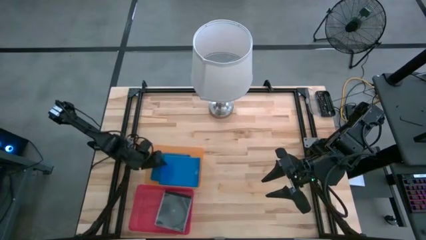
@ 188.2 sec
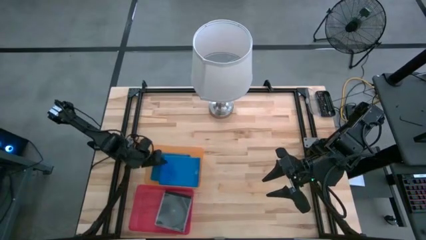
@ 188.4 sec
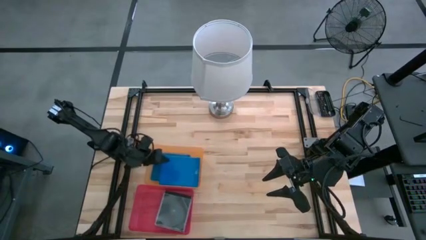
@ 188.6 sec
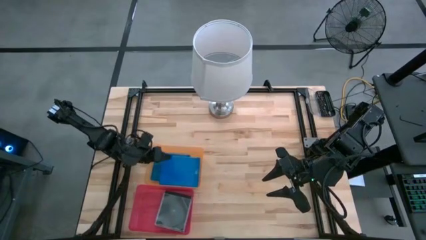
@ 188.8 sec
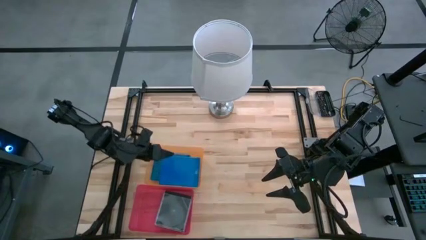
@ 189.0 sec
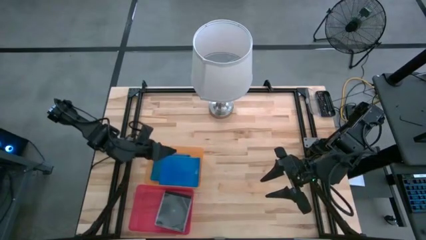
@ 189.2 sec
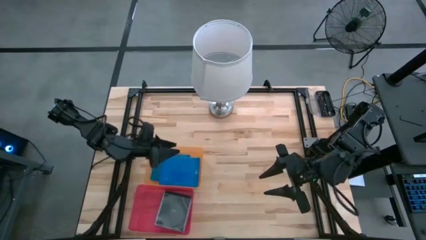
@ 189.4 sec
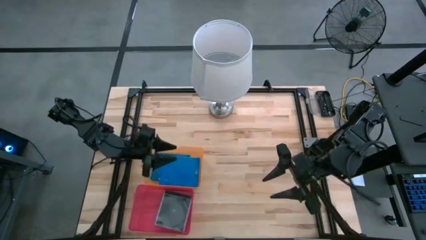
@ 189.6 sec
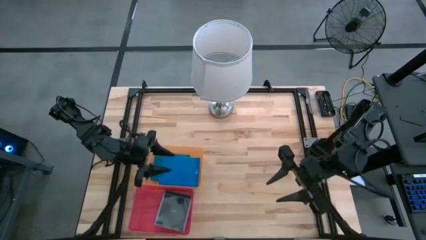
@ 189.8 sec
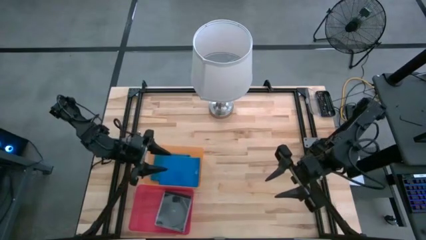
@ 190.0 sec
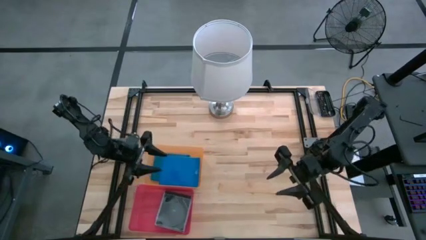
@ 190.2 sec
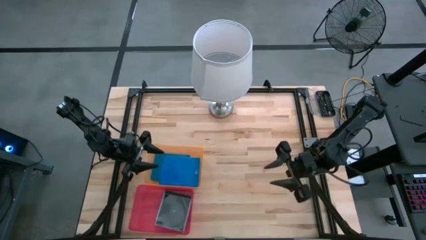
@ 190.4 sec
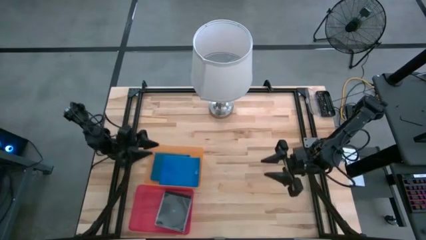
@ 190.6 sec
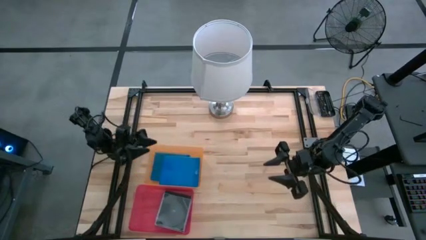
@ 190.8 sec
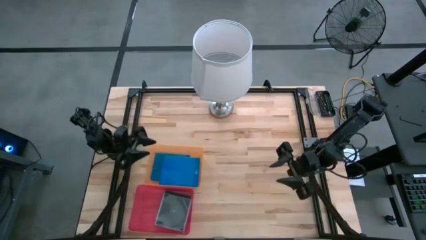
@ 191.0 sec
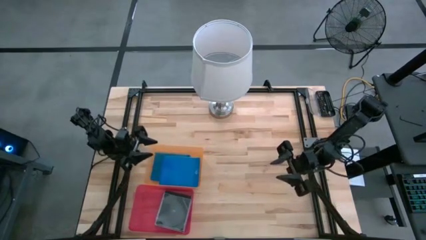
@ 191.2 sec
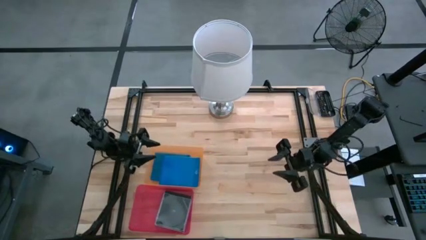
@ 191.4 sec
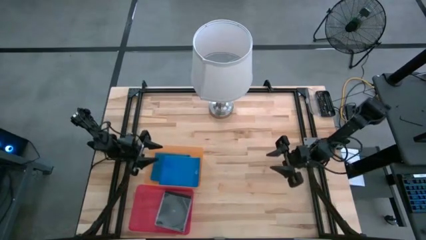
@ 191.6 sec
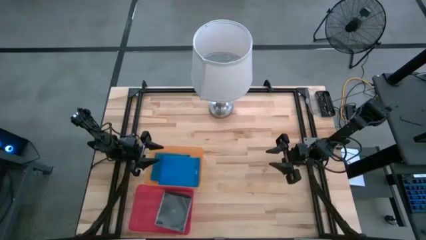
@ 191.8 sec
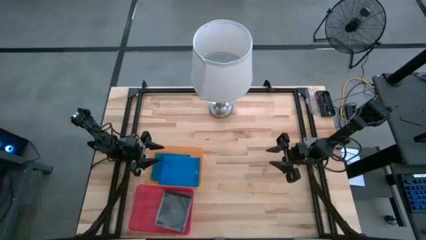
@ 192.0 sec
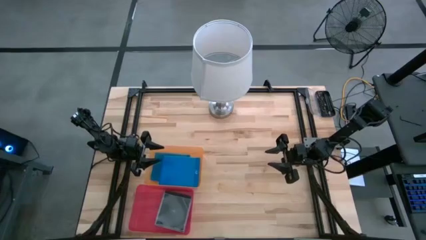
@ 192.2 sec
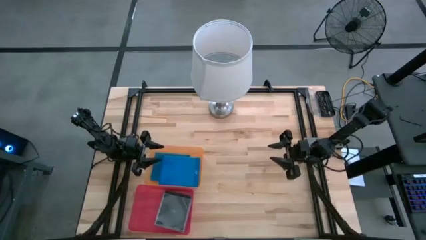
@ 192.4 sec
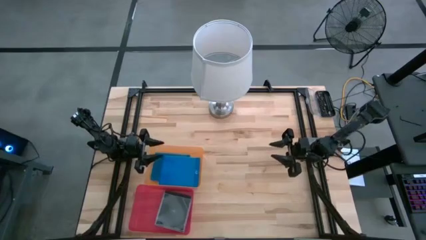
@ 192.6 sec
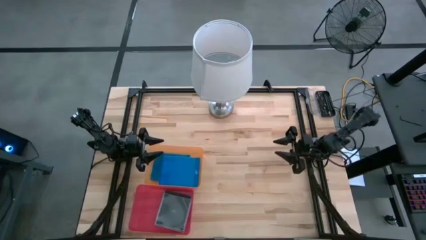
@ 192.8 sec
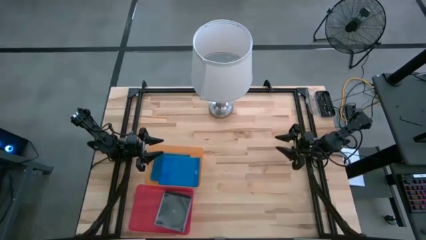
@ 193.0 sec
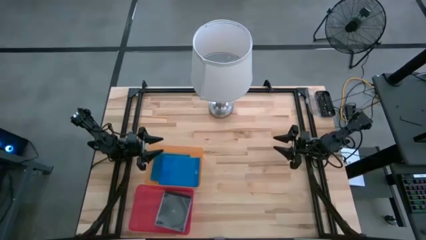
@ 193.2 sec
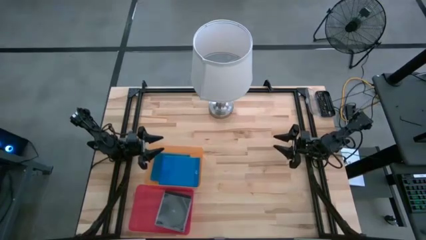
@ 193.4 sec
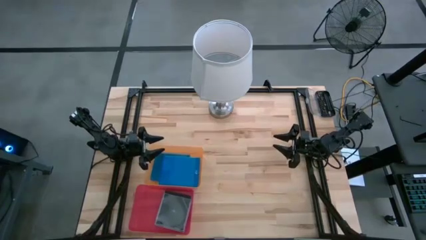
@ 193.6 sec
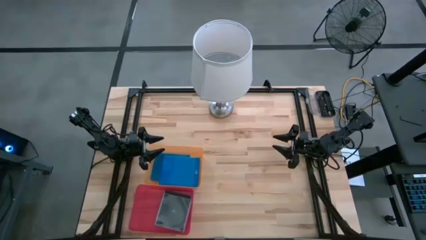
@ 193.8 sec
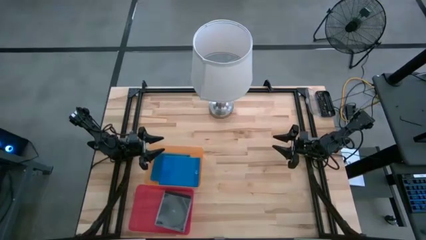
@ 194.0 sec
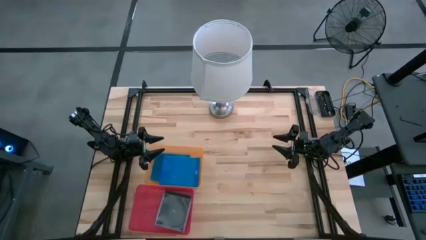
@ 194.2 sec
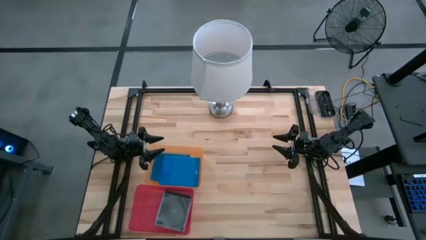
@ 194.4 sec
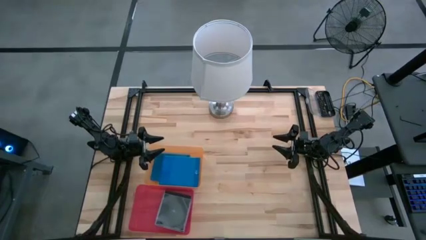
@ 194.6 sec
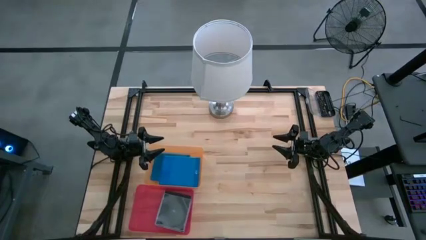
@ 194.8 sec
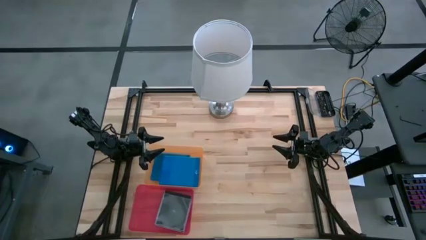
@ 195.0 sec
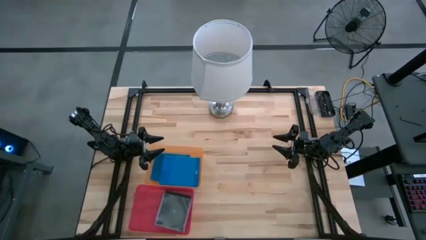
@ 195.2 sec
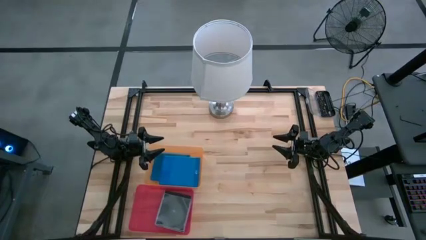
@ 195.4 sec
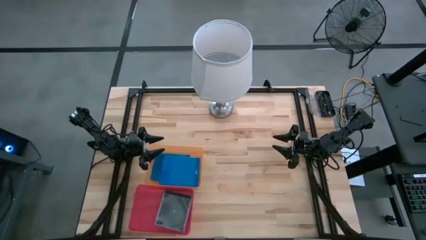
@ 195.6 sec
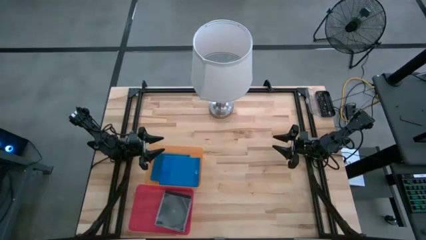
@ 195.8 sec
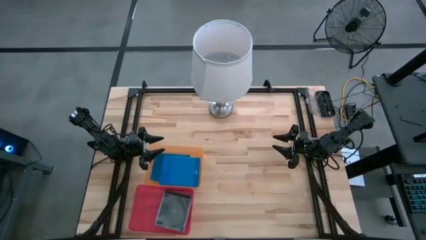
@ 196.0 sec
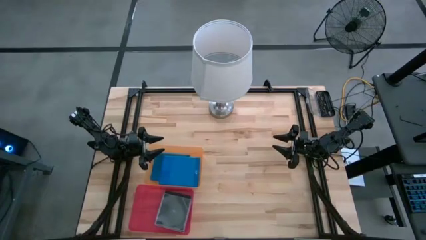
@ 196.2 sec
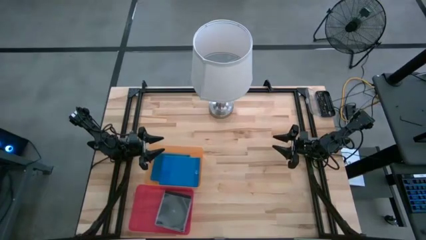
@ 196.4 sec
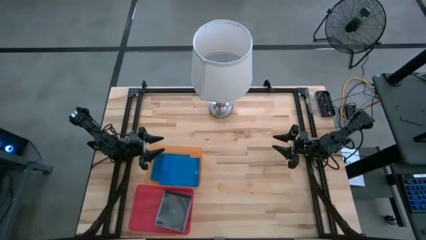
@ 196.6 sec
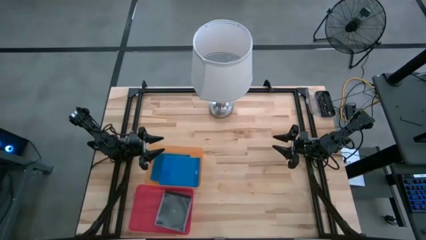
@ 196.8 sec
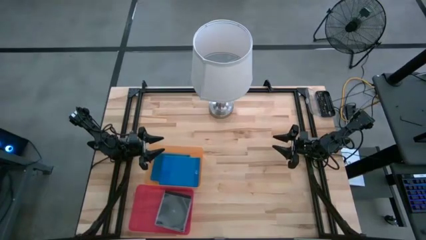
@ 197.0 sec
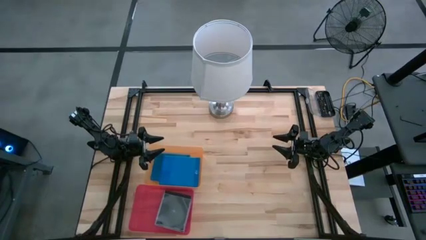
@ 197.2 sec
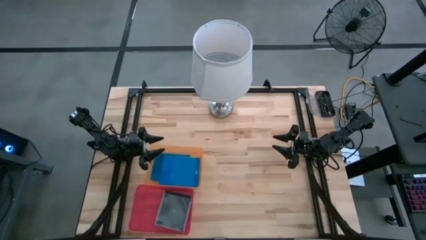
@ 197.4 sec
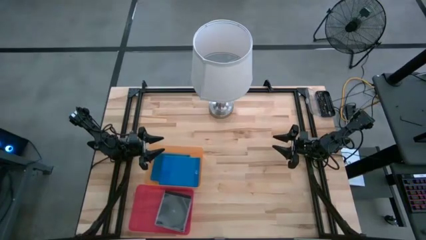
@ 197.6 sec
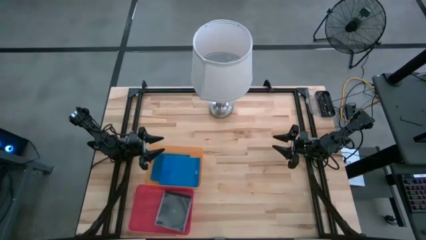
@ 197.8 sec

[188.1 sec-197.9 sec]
Task: Pick & place jewel cases by type
Return to Home Position

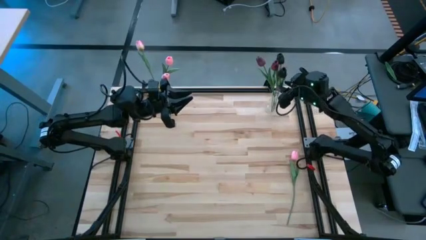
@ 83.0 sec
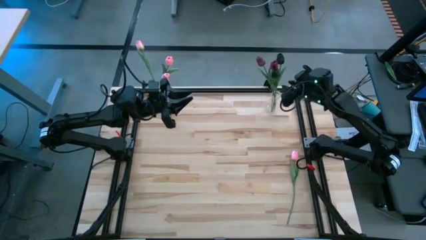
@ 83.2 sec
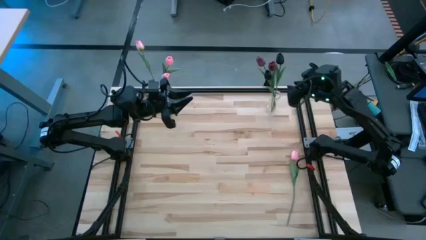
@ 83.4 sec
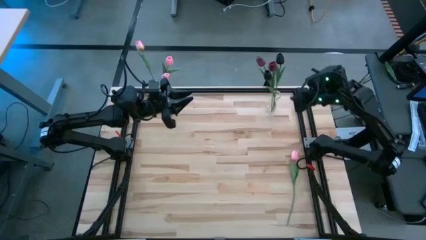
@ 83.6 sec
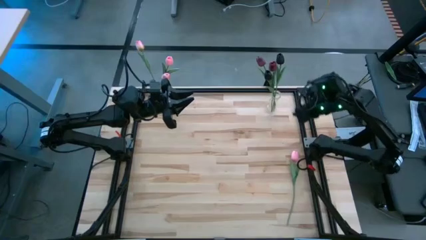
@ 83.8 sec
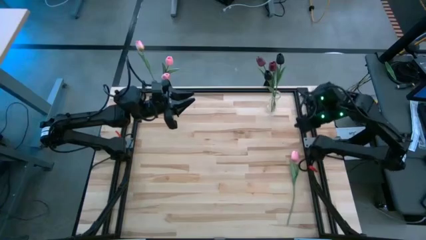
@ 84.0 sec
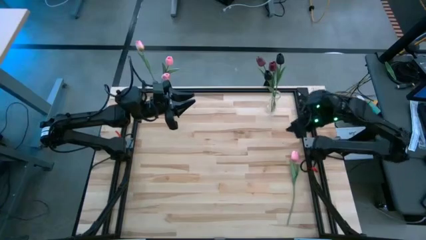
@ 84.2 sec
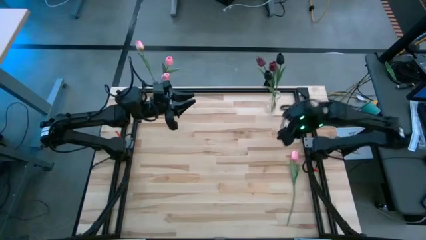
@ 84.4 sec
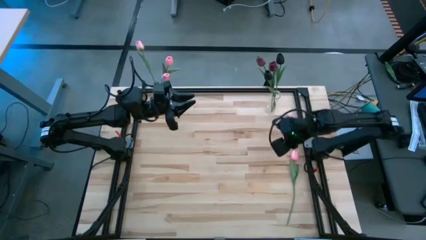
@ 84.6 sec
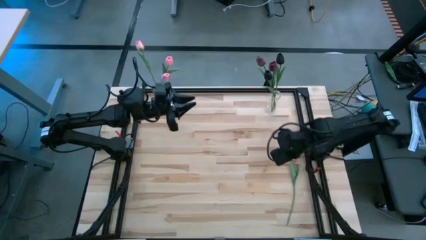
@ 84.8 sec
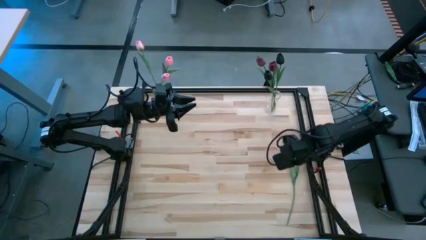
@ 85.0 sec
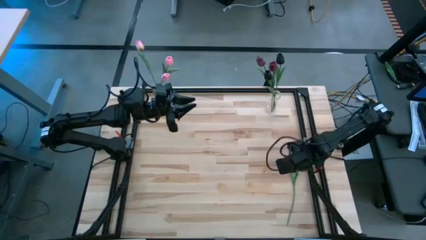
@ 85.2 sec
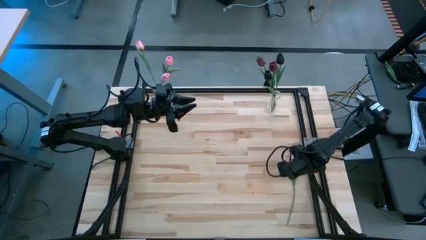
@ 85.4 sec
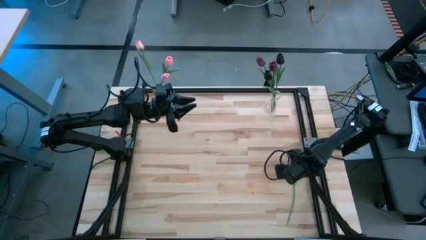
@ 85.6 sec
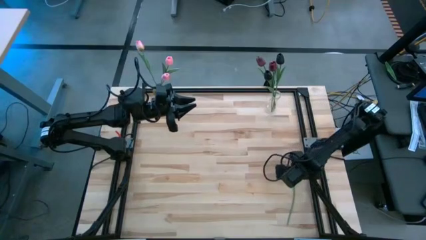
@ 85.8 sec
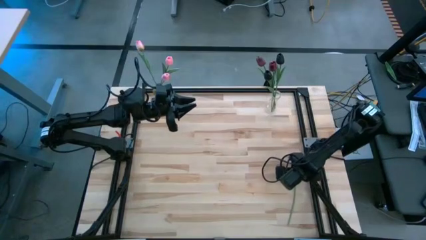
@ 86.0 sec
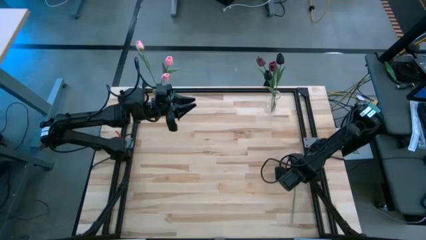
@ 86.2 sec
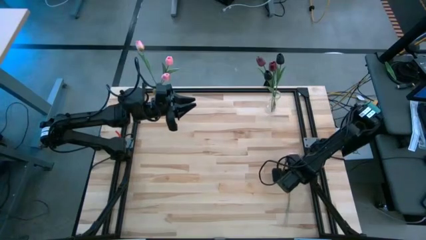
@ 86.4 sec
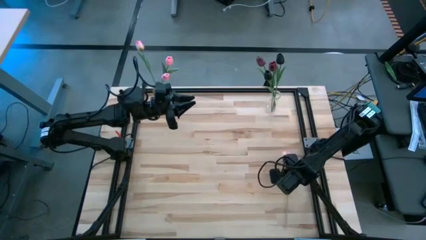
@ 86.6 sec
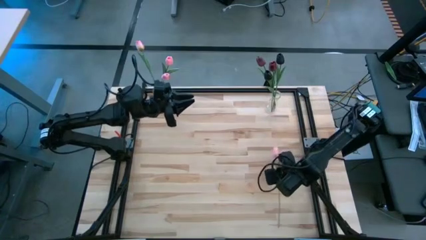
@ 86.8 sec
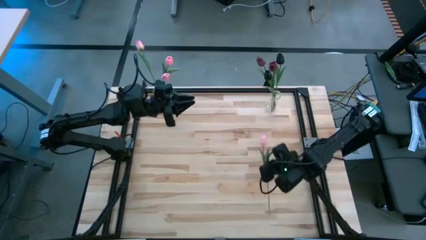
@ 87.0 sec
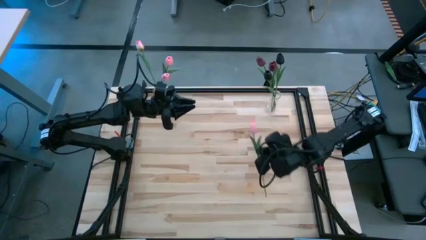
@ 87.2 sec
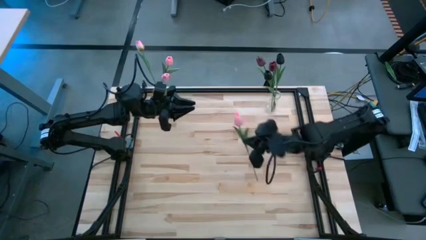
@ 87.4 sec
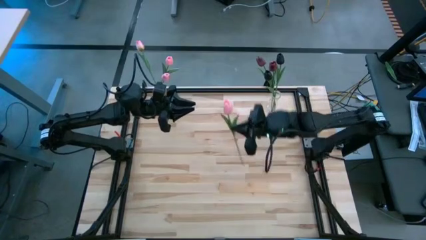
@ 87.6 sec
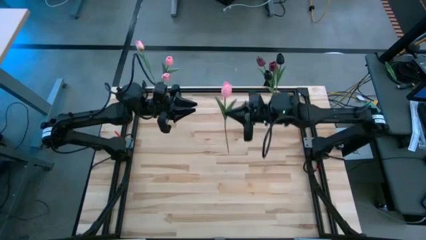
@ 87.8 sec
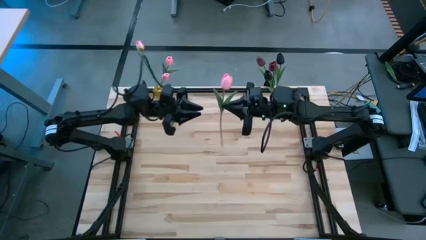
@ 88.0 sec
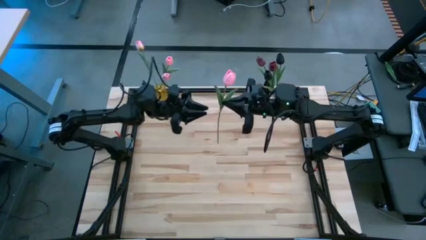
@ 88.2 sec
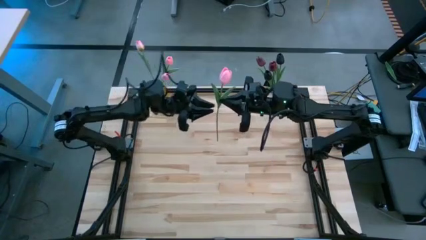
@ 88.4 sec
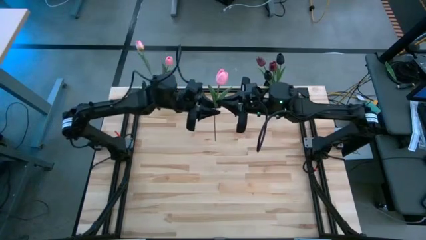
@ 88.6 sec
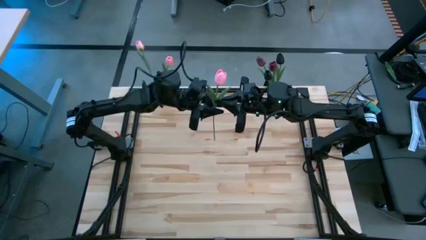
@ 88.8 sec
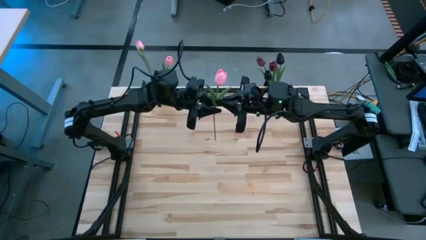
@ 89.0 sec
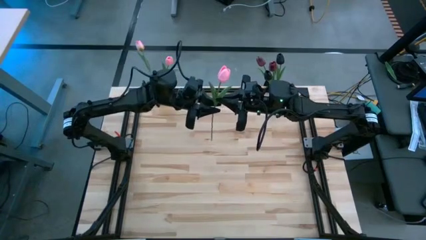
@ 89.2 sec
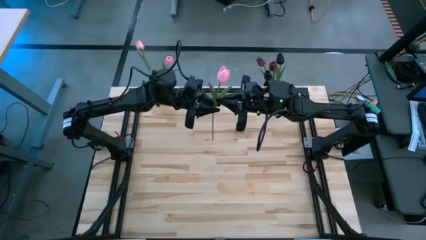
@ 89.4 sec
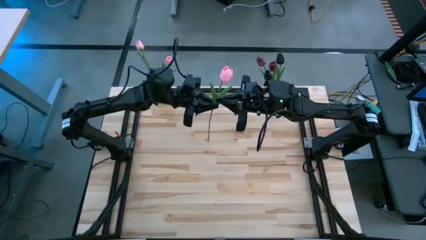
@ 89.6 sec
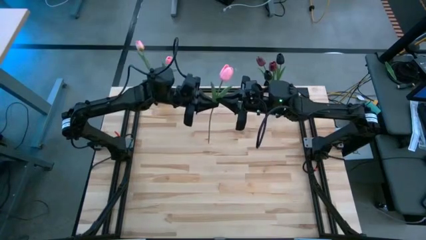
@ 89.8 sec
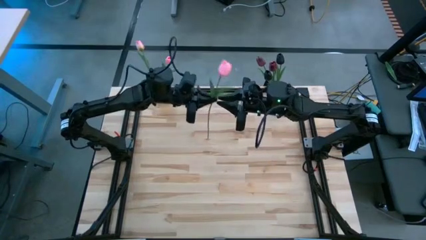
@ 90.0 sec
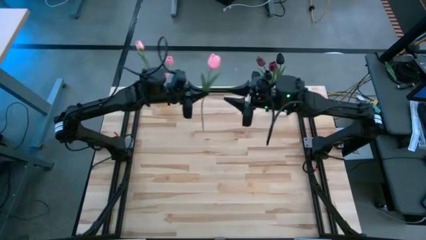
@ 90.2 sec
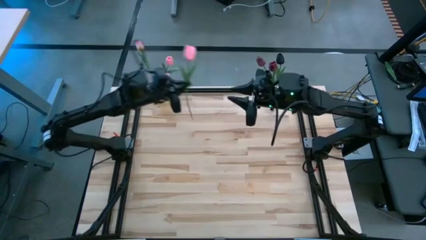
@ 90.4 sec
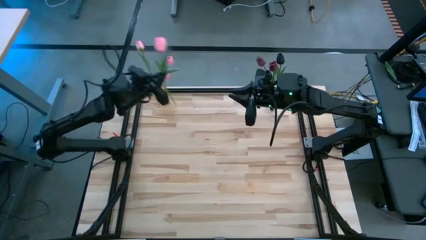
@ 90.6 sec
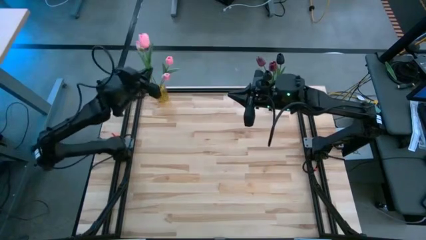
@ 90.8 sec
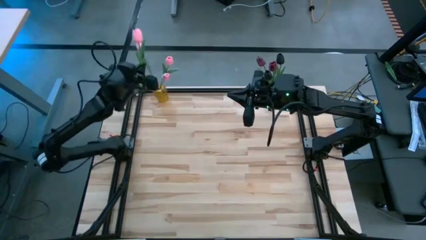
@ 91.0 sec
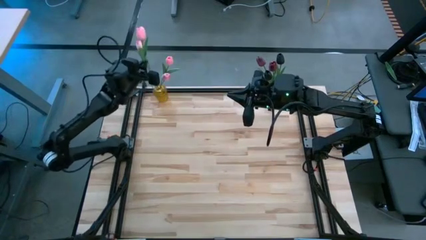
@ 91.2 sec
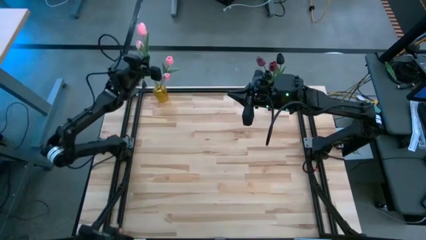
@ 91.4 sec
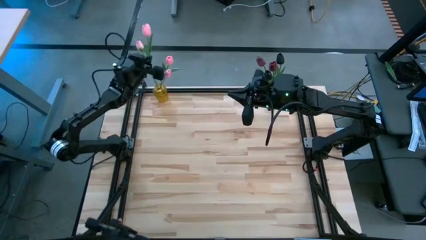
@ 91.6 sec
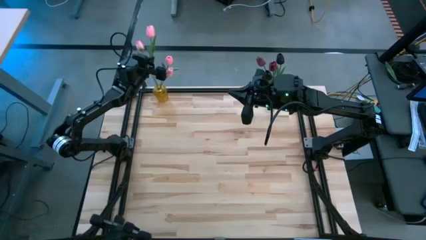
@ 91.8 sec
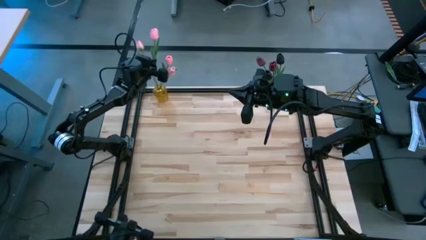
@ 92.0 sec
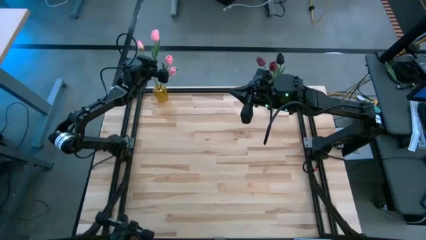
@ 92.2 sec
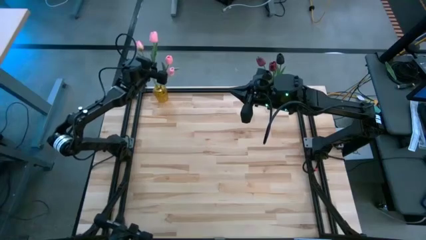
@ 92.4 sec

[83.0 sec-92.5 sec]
Task: Sort flowers into vase by color
Insert the pink tulip into the yellow glass vase
